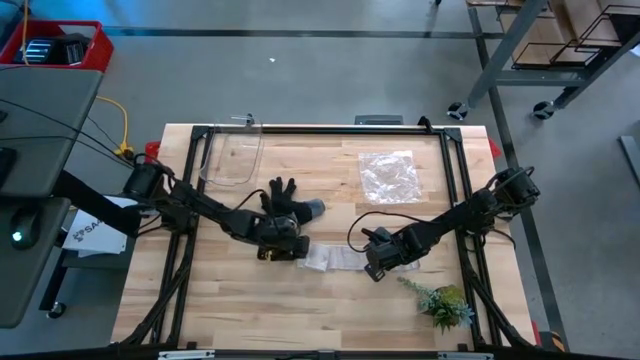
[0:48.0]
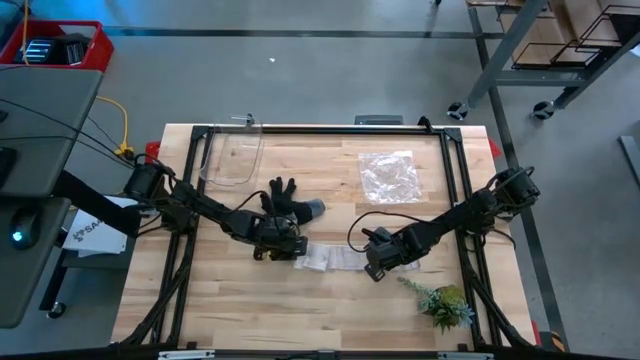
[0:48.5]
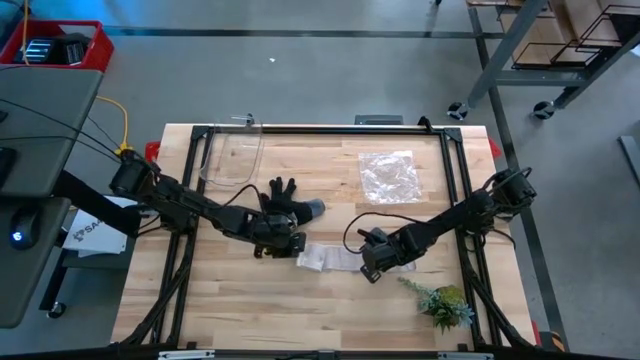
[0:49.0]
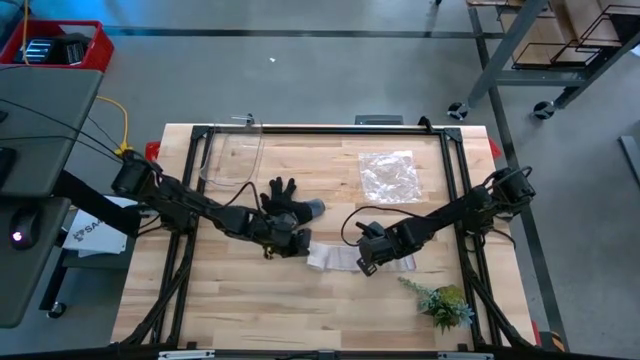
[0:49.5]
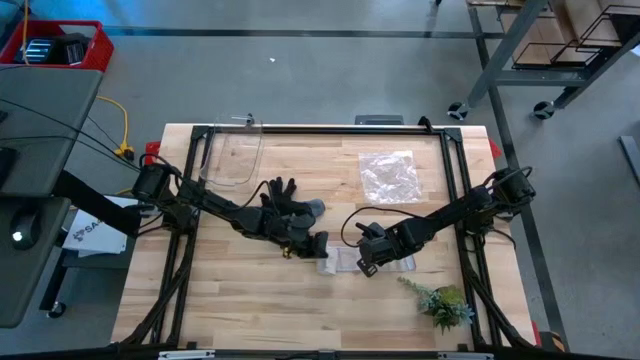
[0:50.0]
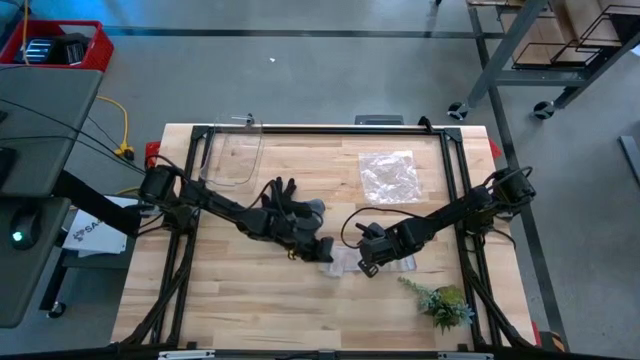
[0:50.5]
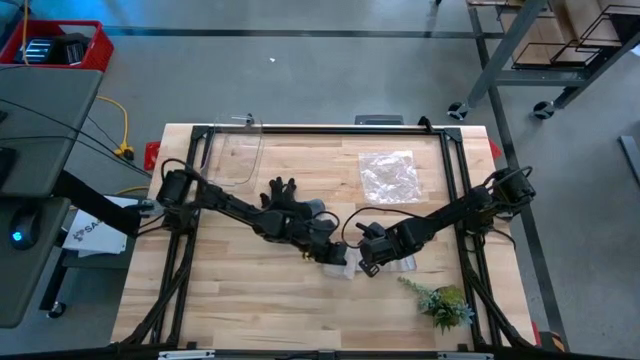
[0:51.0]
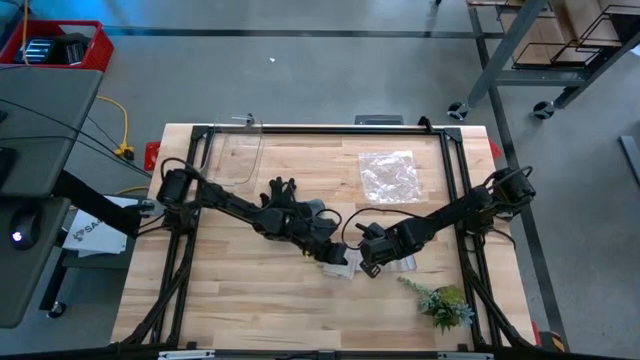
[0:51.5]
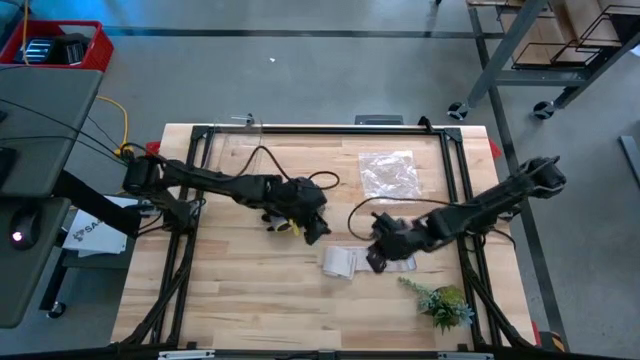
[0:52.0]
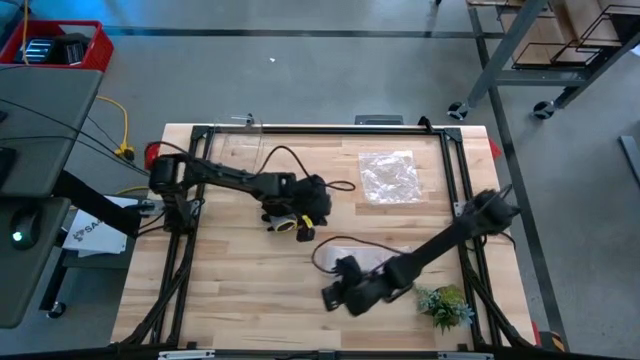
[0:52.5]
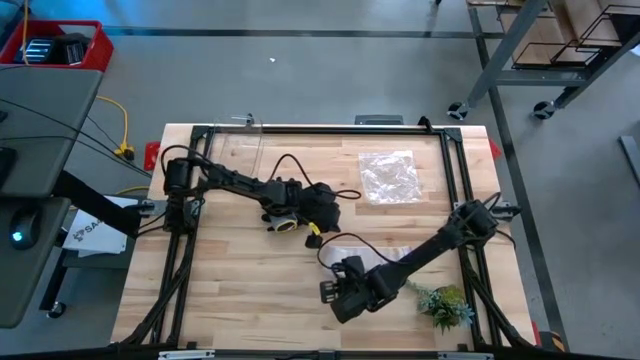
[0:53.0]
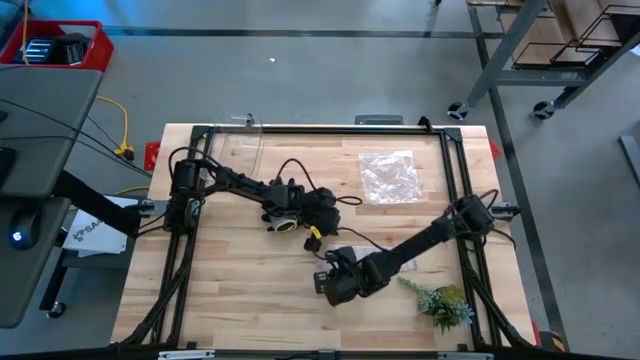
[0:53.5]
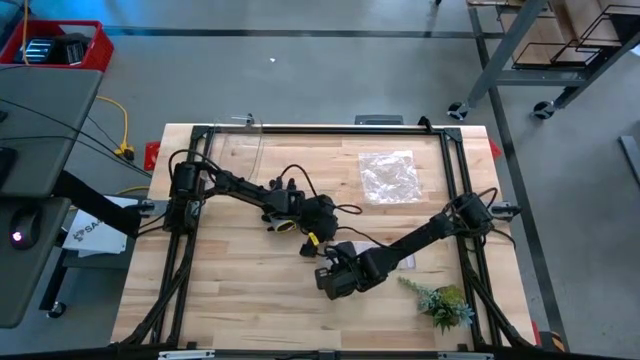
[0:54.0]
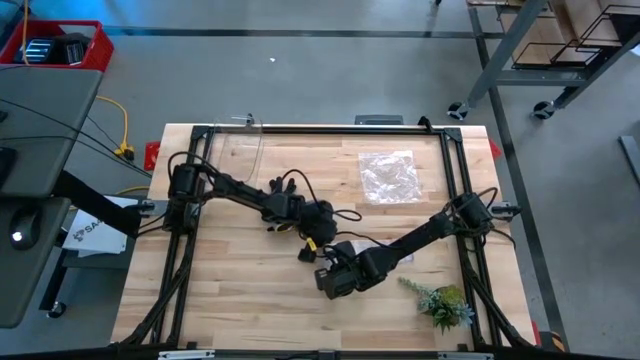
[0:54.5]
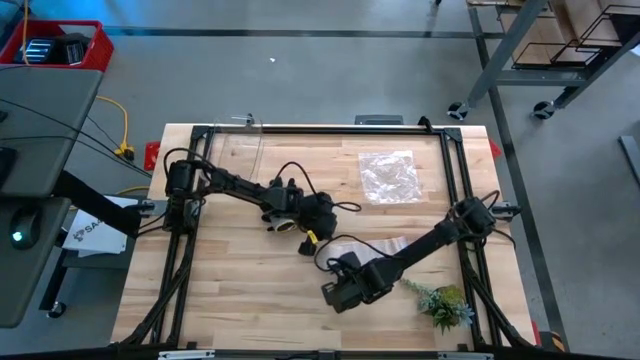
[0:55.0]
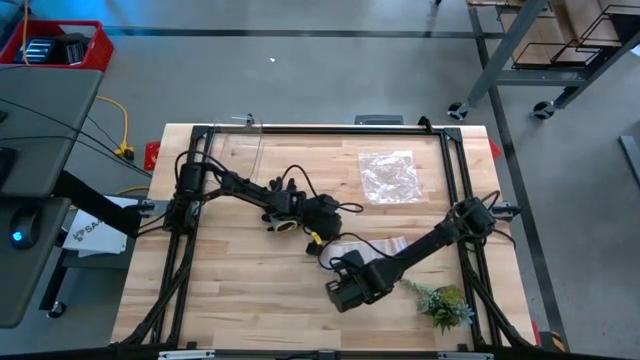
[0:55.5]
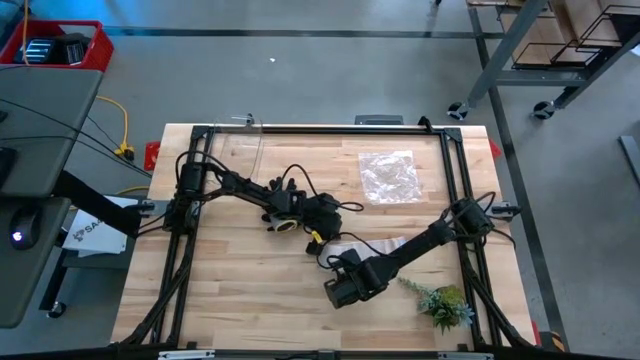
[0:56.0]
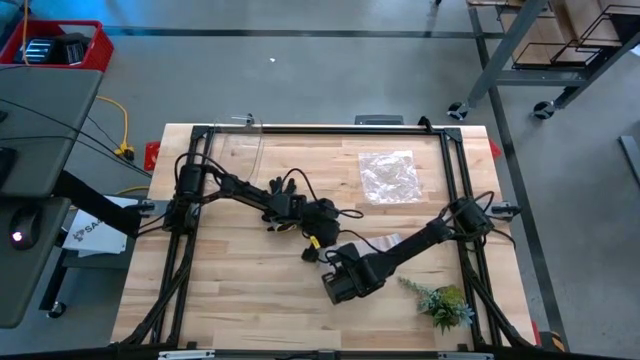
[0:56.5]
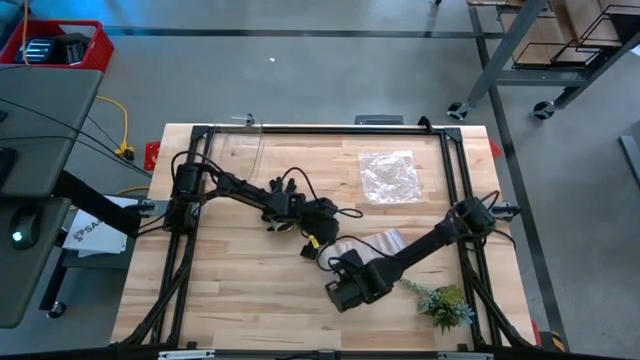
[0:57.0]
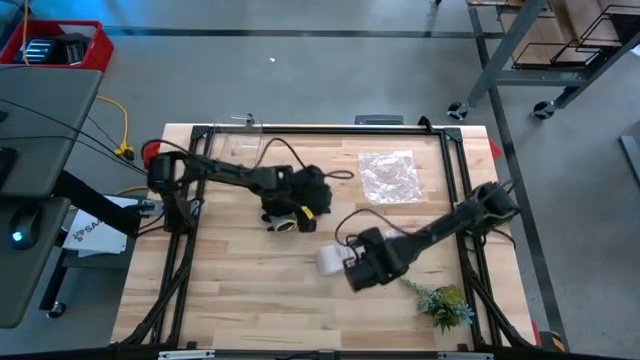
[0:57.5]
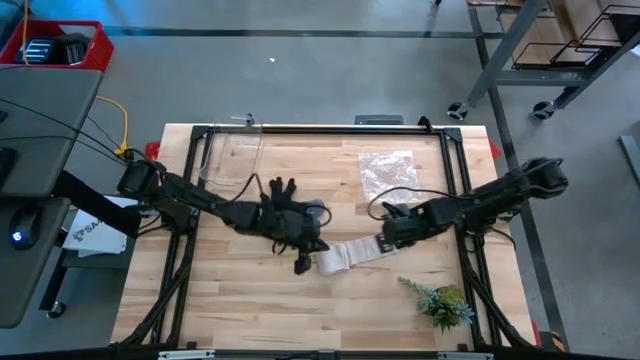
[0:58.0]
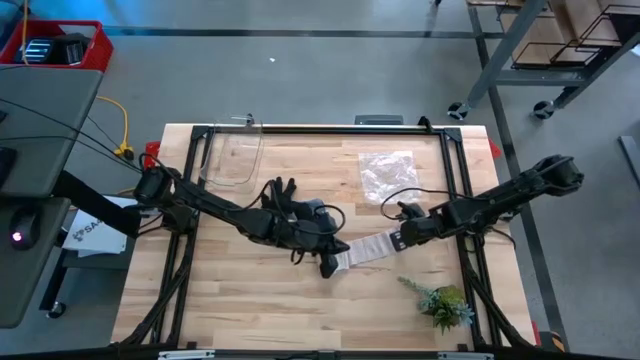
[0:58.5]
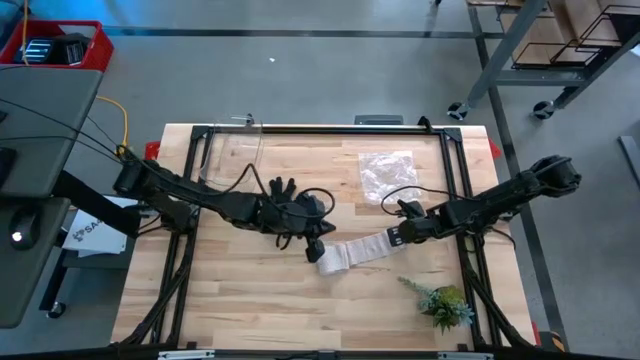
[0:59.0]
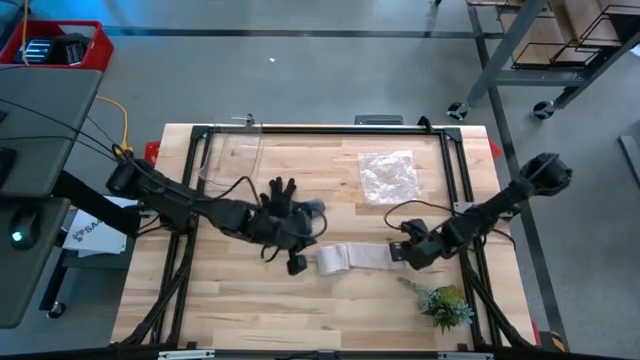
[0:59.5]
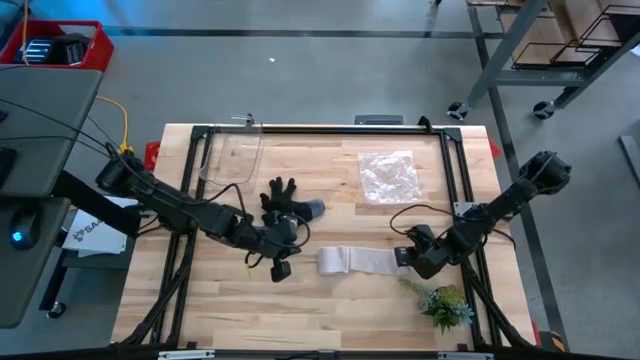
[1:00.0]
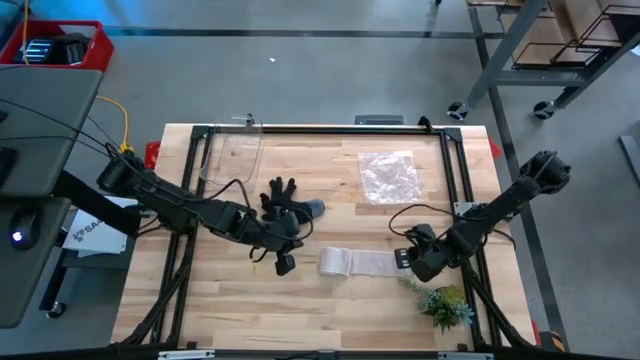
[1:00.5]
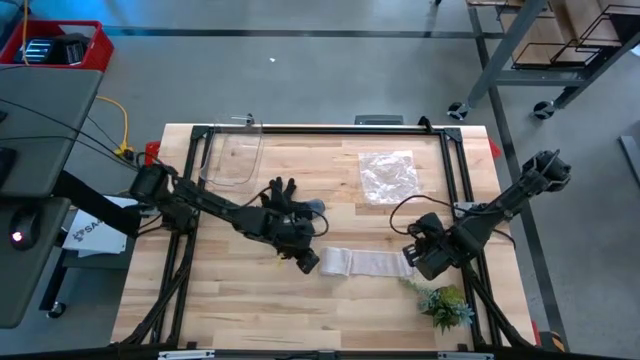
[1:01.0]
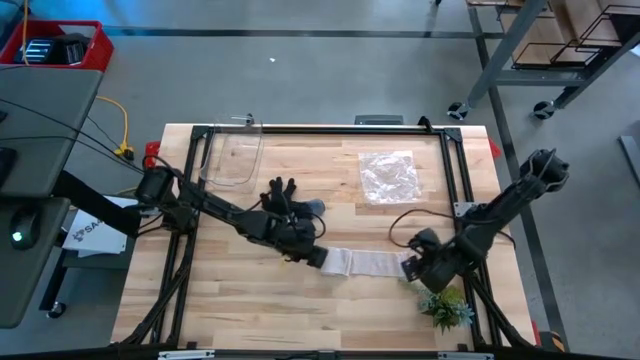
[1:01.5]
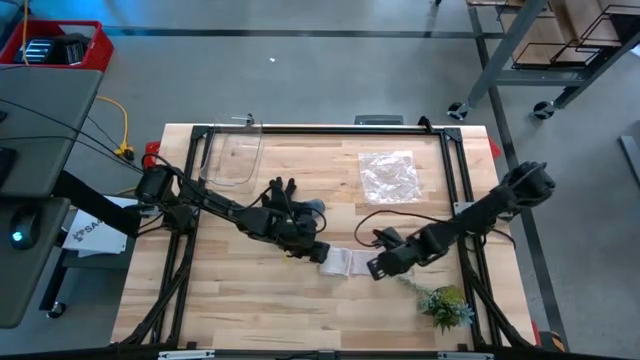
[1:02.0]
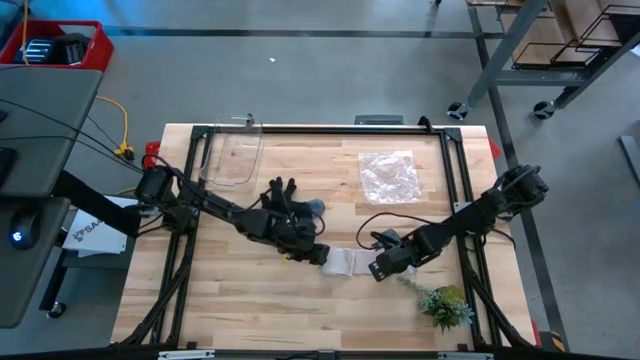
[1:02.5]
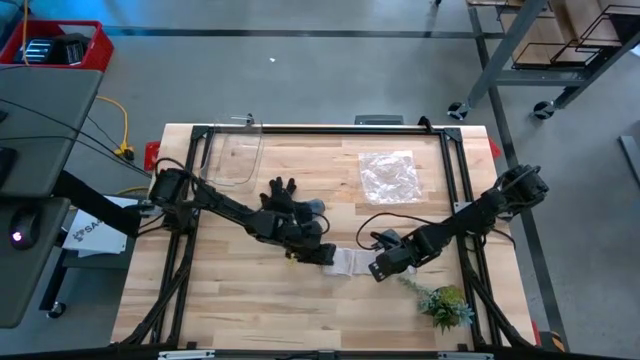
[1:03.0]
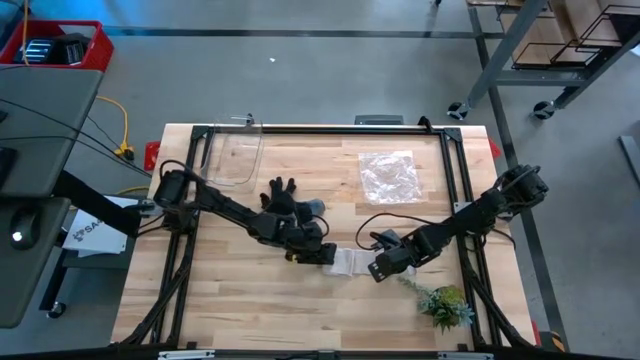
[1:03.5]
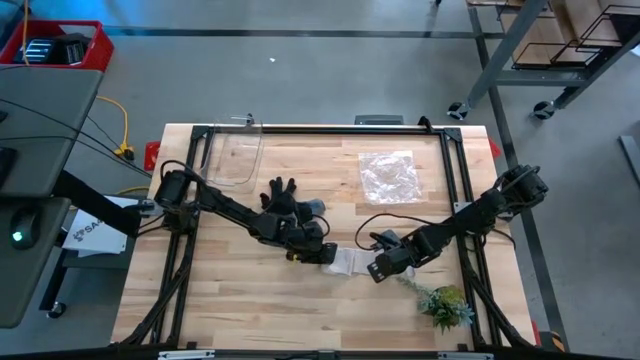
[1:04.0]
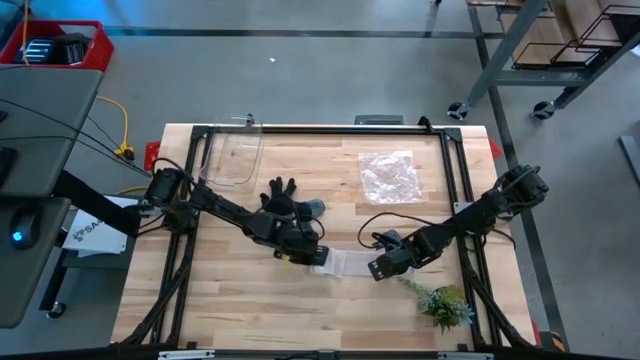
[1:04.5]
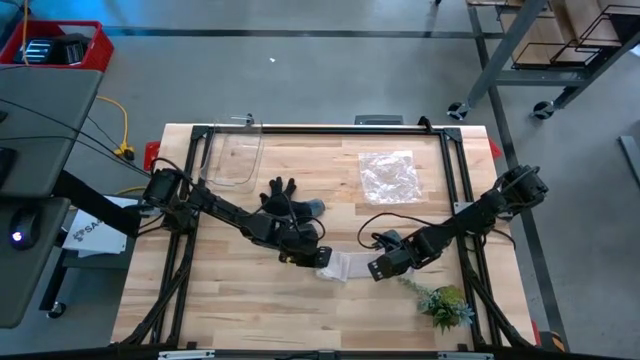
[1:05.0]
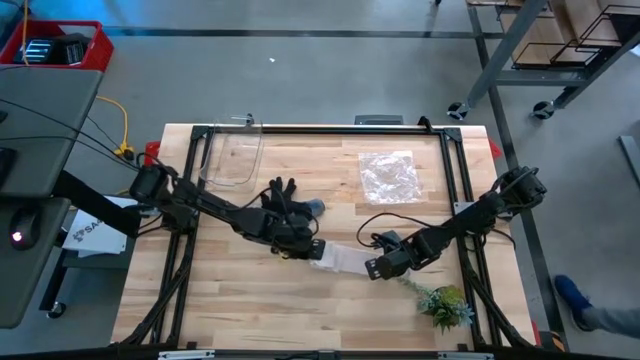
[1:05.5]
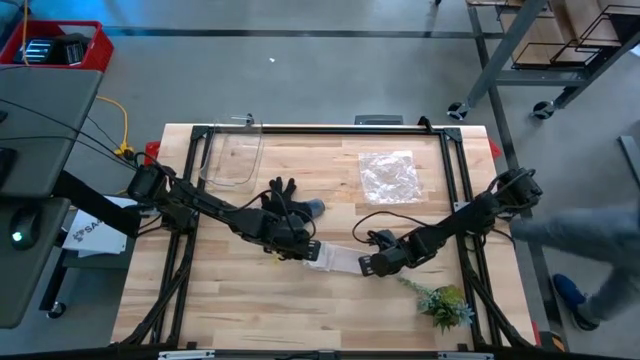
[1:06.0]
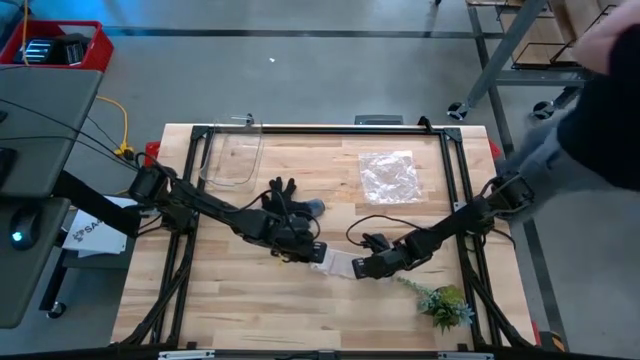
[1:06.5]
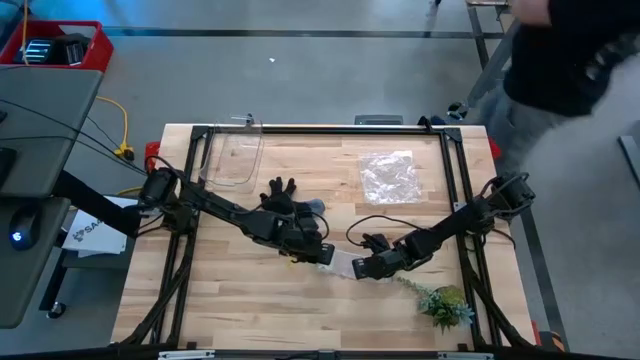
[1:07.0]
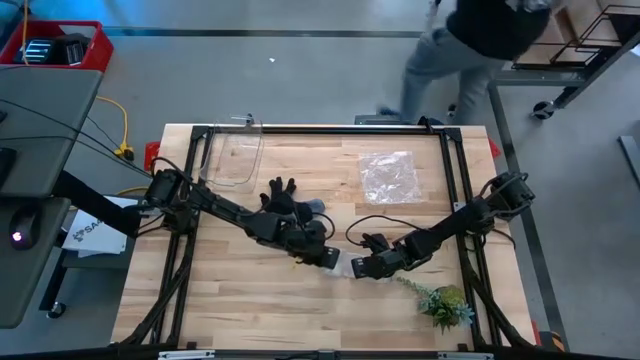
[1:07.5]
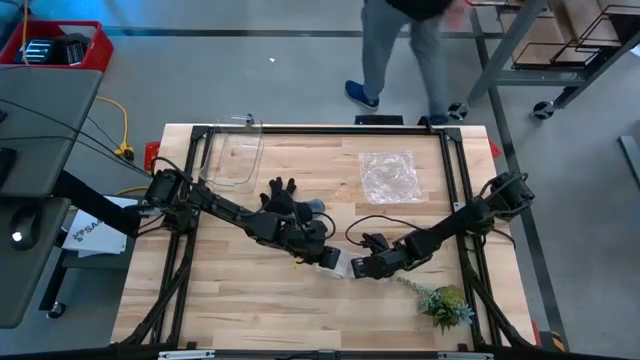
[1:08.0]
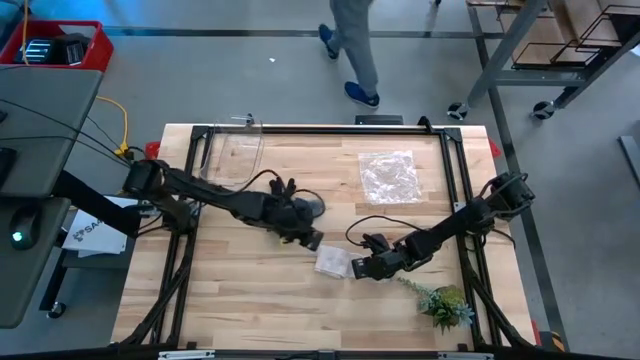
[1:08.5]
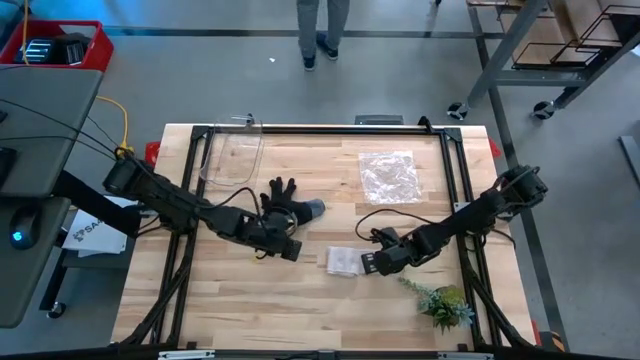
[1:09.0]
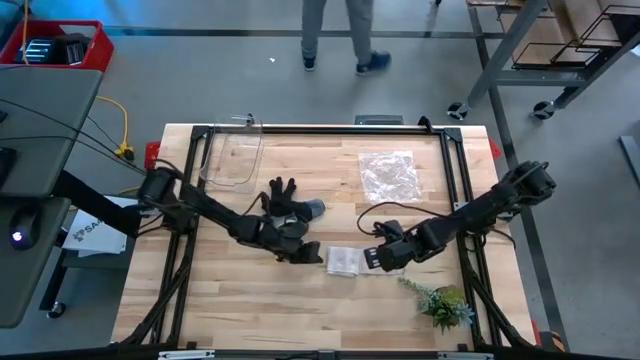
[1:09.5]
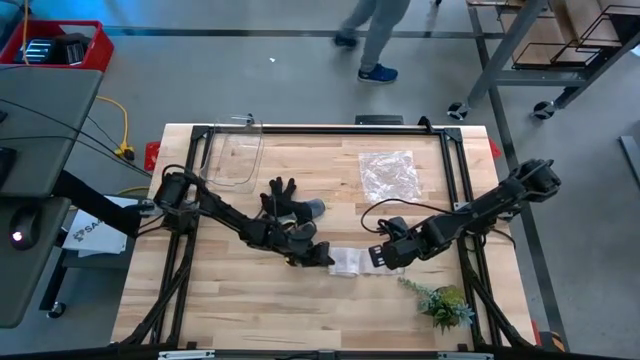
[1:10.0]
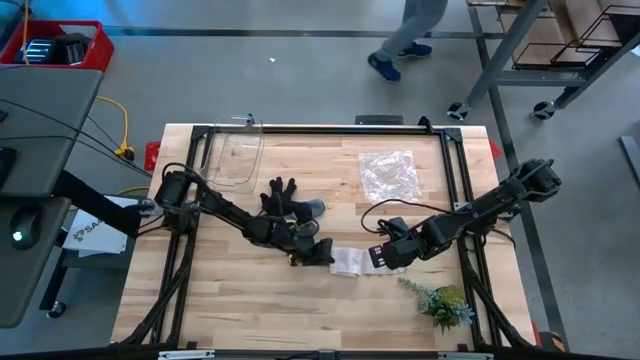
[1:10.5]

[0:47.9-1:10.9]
Task: Roll bandage
Roll the white-brown bandage
